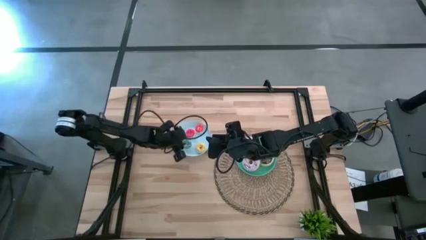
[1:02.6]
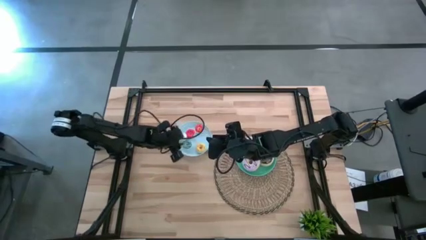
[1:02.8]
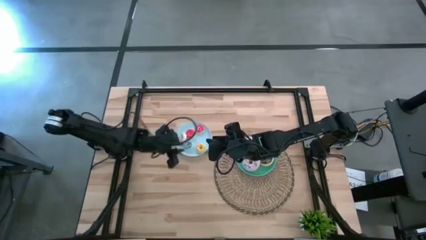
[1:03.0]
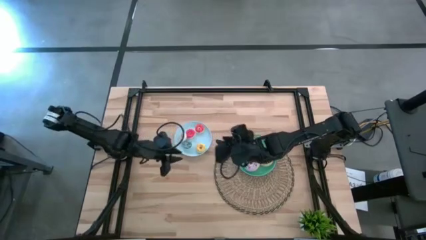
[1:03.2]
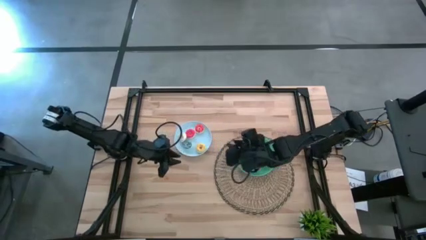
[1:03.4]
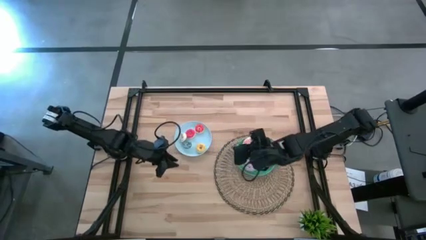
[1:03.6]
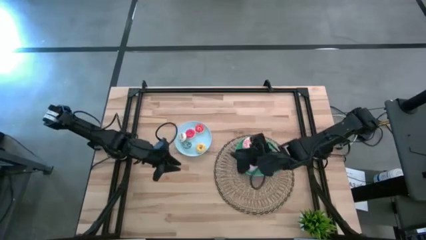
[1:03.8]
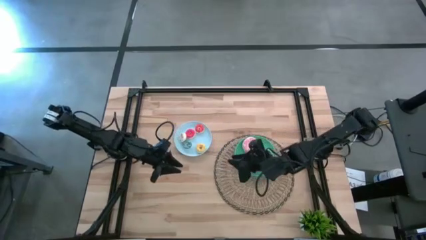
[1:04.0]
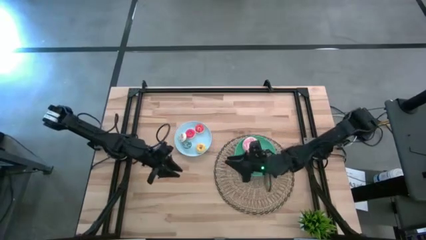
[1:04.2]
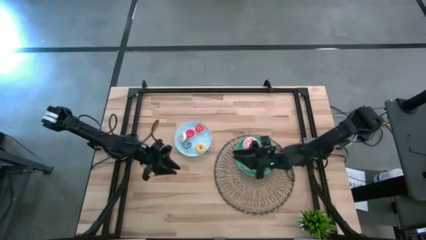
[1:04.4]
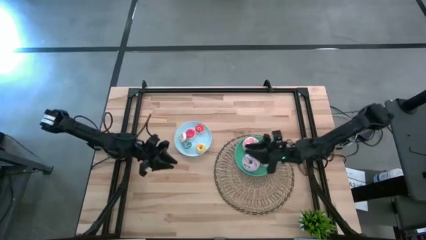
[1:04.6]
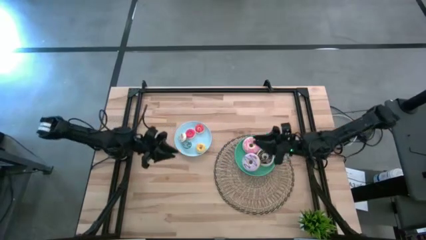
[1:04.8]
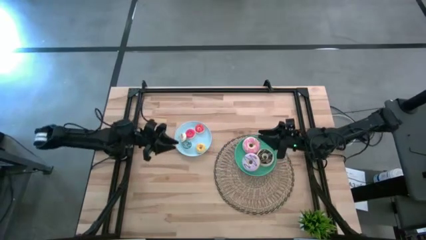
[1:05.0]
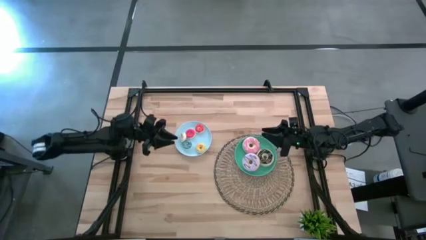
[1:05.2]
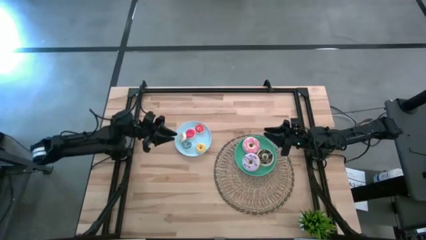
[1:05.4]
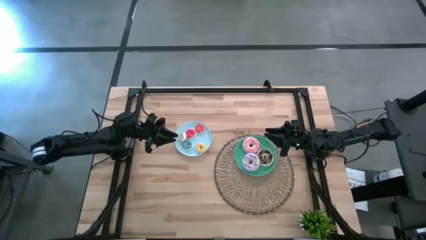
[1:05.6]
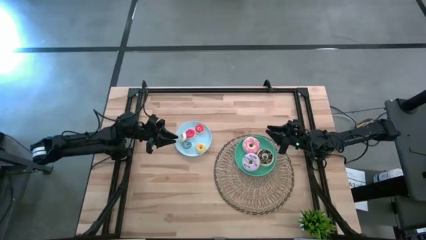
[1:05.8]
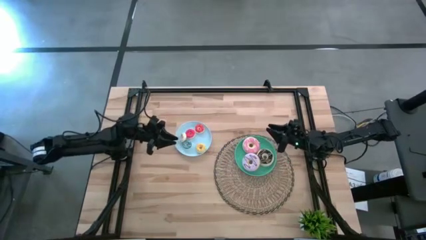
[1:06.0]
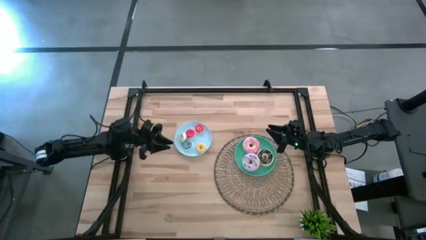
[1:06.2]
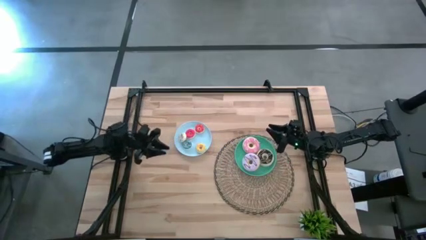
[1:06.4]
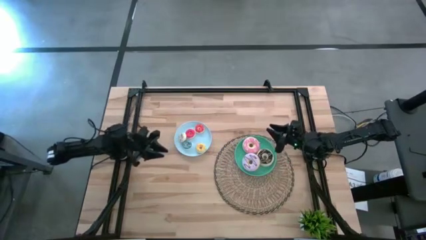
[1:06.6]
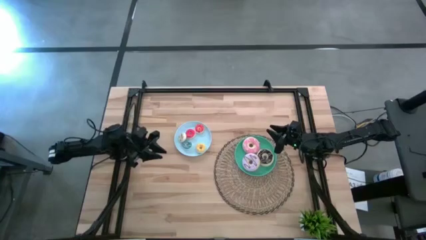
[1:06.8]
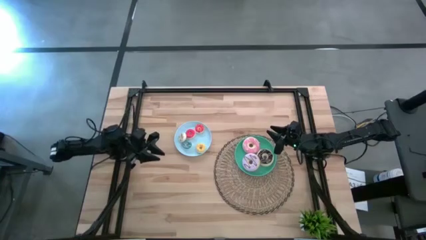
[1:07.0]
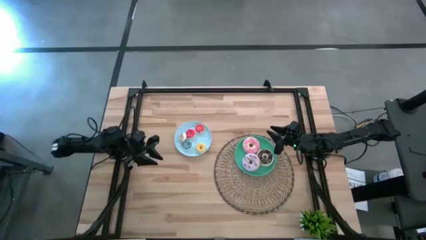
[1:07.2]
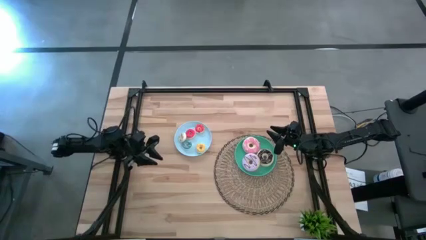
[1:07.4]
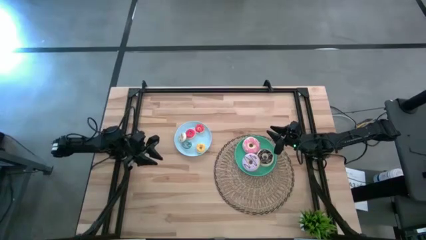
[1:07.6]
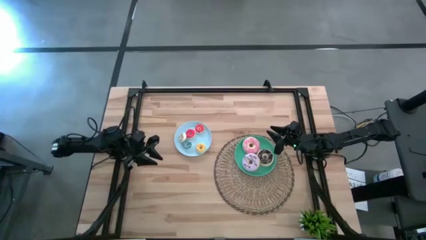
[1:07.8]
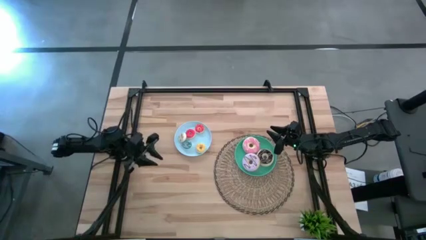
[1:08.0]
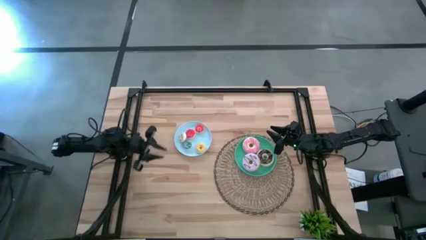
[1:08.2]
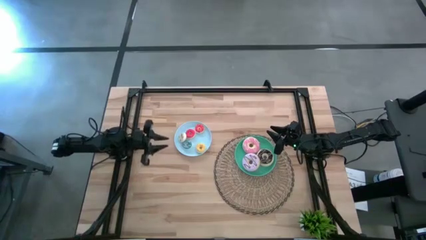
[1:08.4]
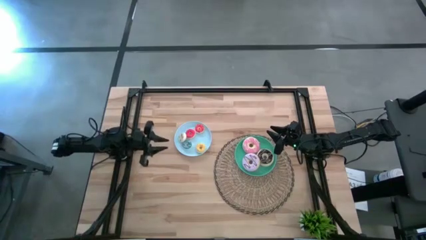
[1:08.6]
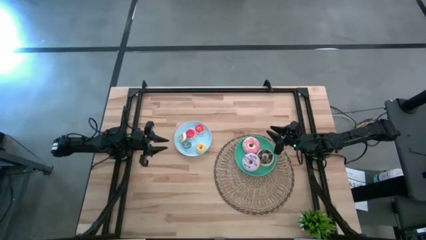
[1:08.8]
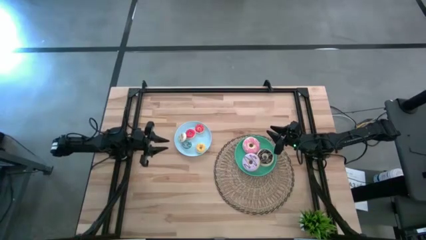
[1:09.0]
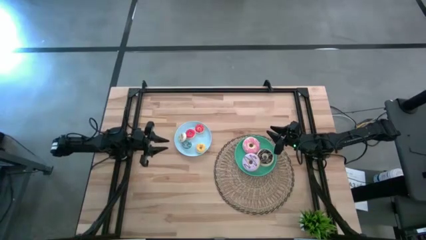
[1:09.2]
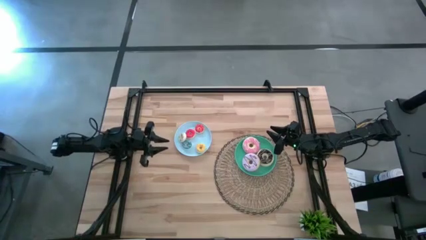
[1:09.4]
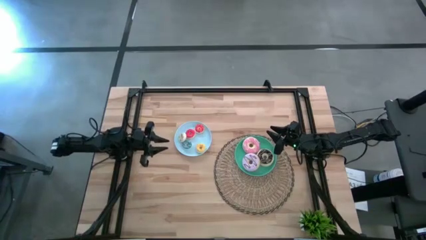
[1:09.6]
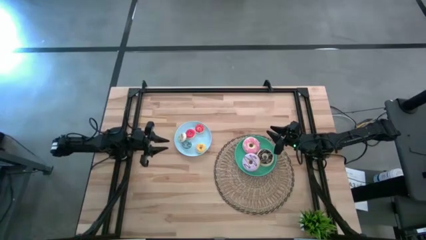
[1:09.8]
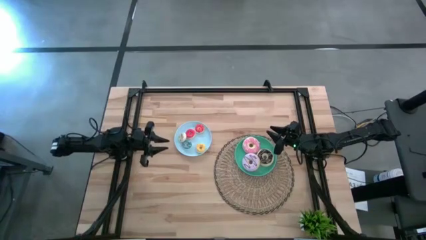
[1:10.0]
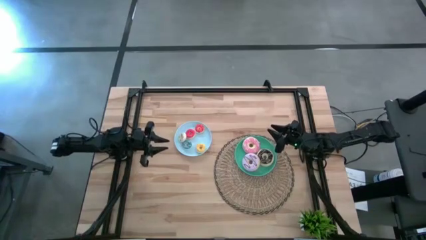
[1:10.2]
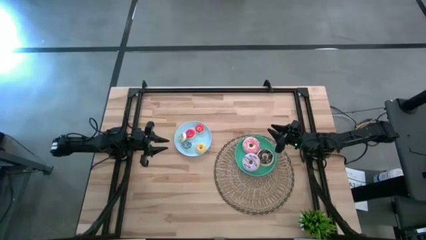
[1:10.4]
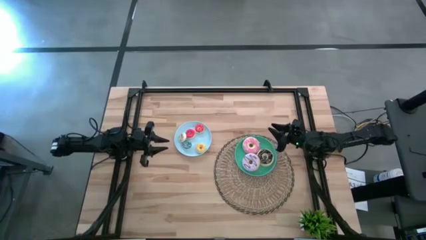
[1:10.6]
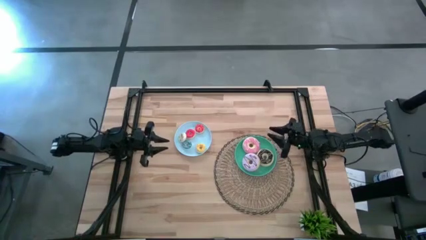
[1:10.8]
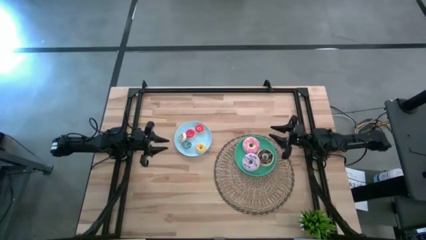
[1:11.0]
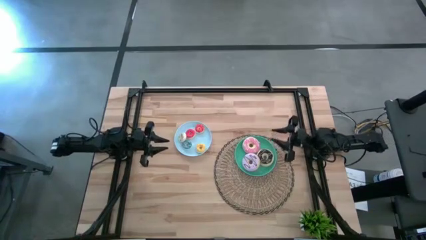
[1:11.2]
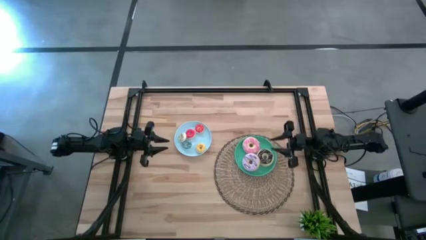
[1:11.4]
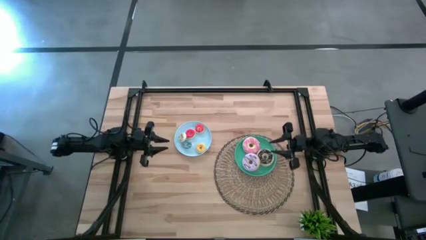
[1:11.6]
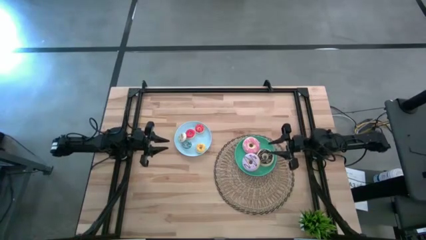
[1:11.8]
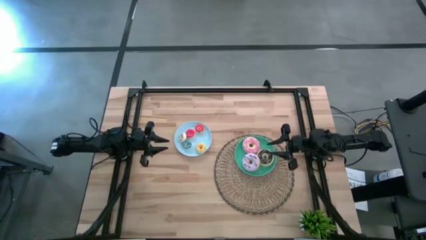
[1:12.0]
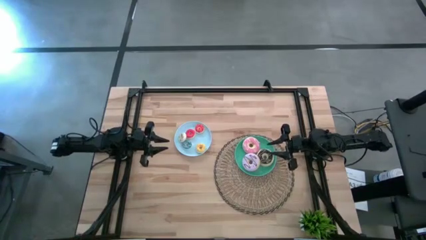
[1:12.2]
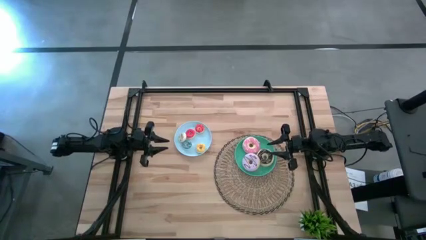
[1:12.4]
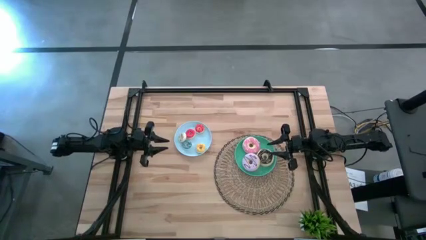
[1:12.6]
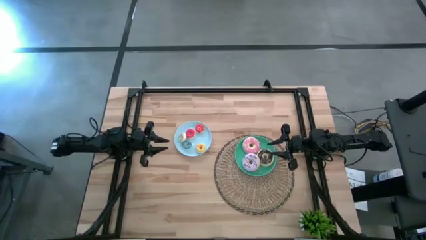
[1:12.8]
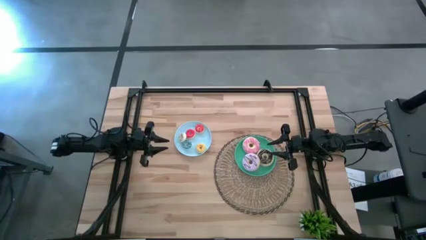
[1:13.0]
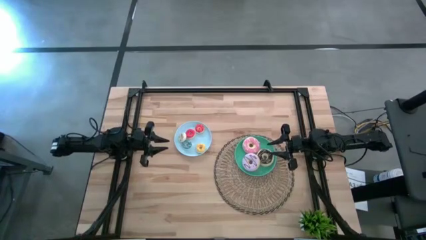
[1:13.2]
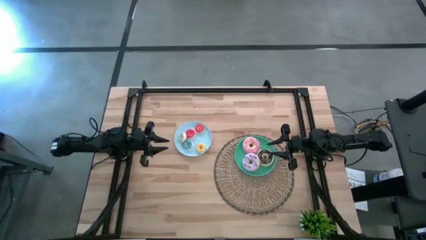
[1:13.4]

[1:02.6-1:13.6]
Task: Pick & Place donuts
Return to Home Position
